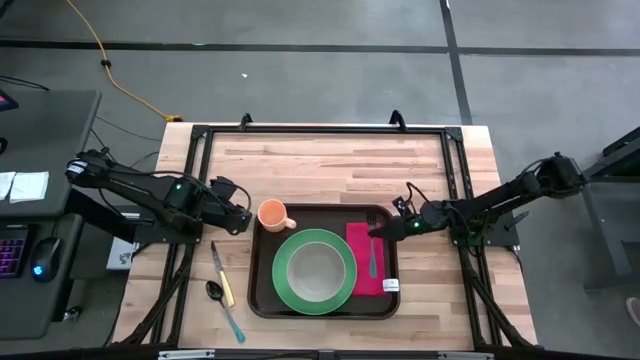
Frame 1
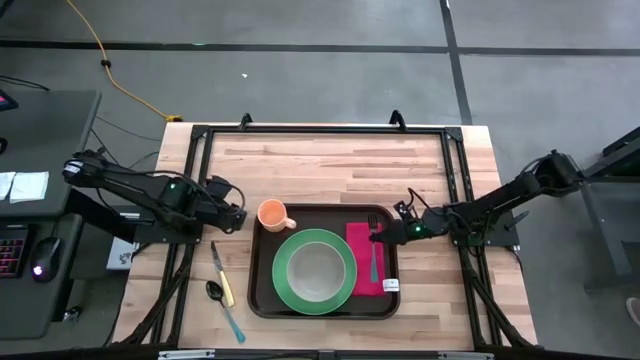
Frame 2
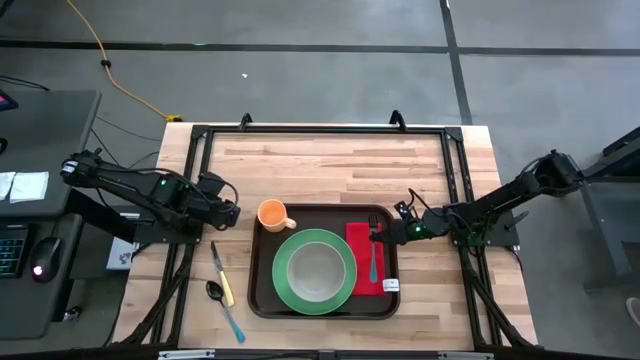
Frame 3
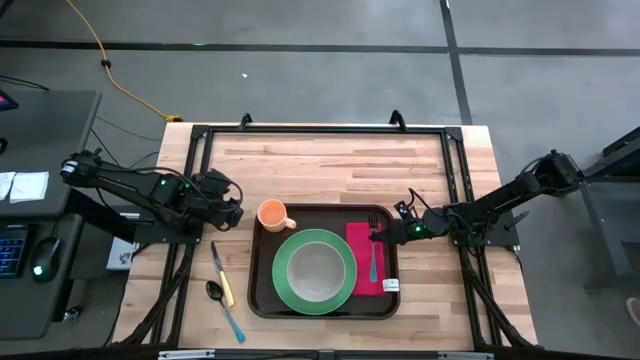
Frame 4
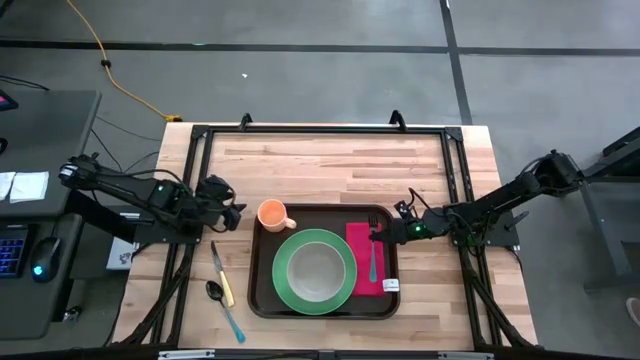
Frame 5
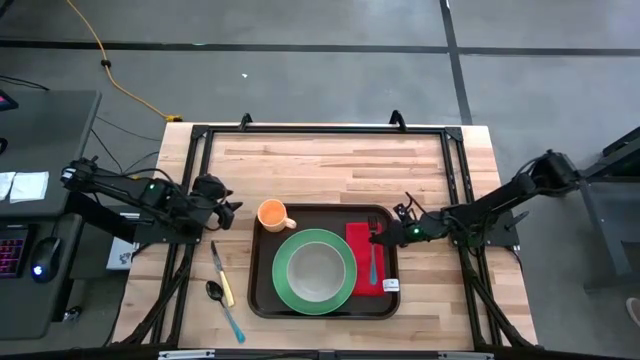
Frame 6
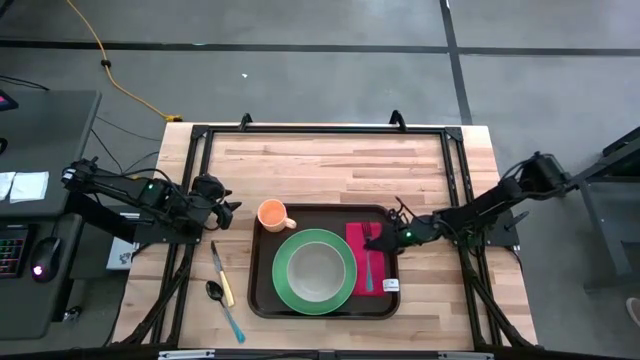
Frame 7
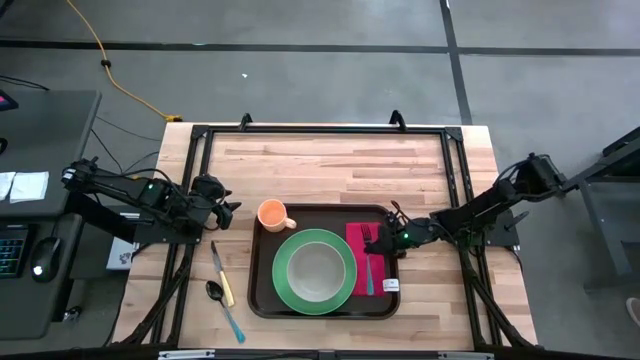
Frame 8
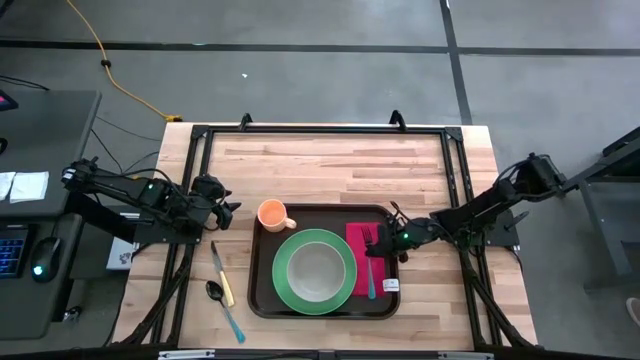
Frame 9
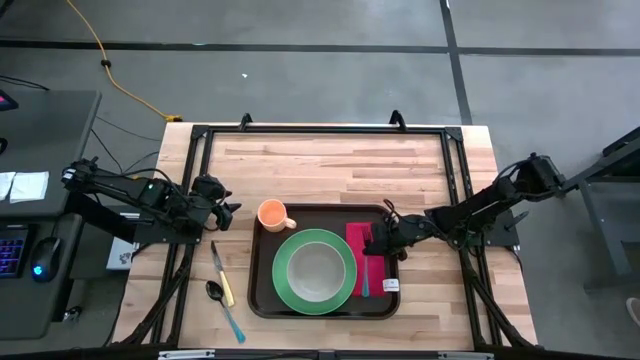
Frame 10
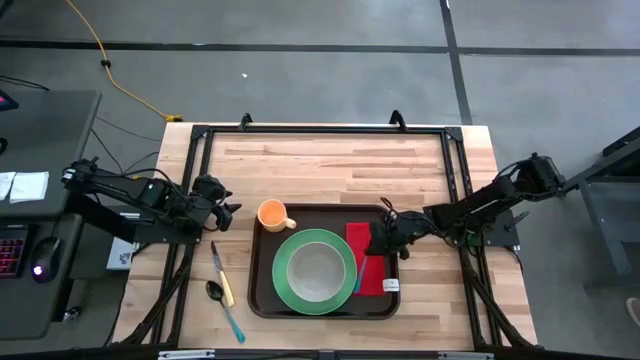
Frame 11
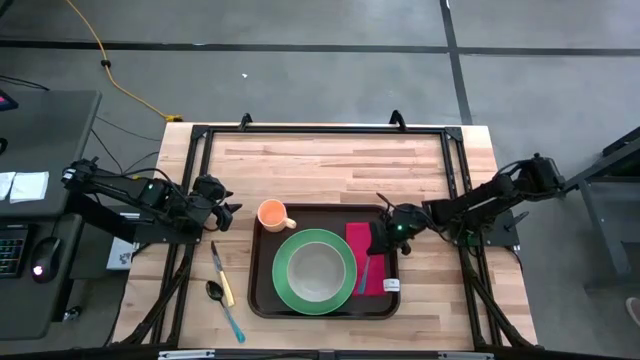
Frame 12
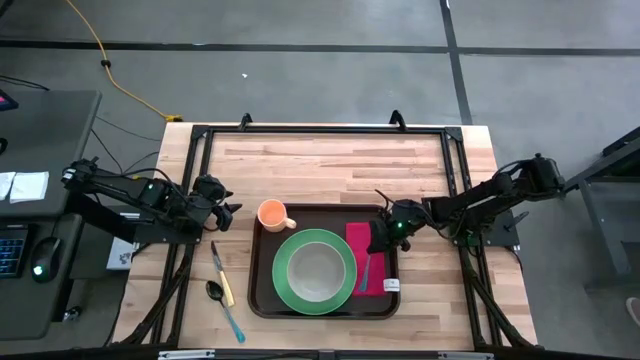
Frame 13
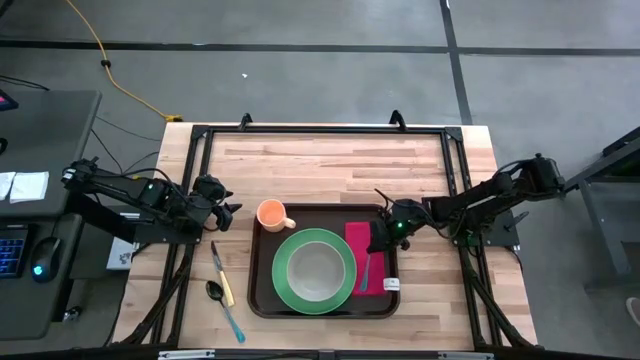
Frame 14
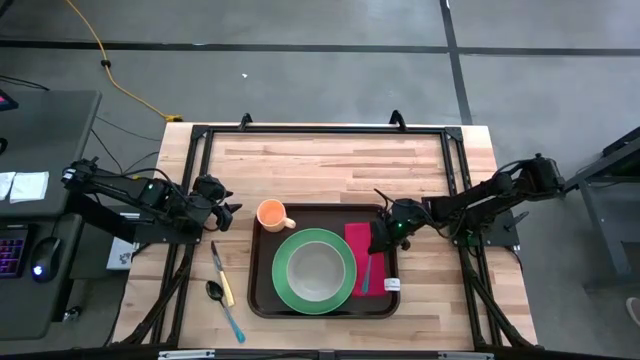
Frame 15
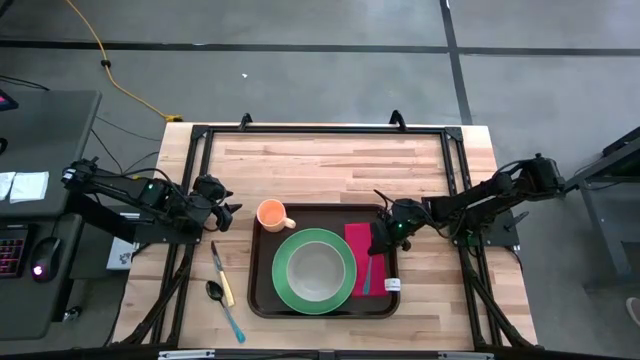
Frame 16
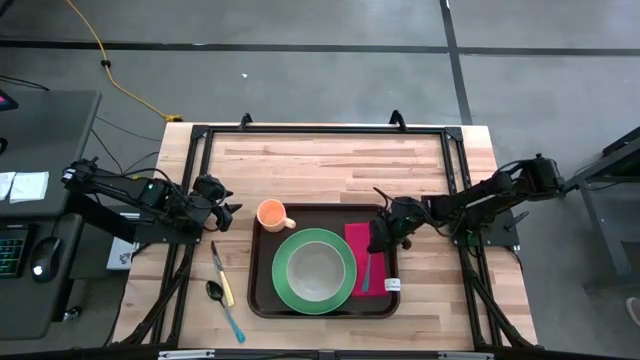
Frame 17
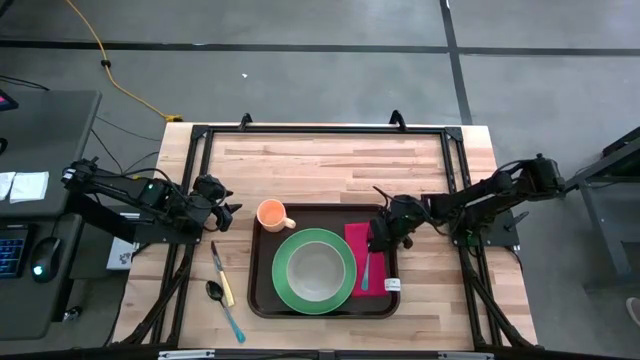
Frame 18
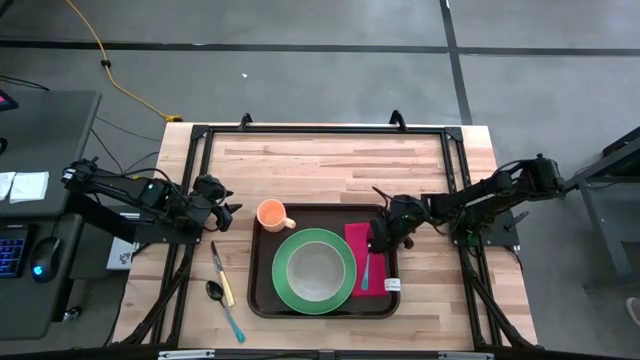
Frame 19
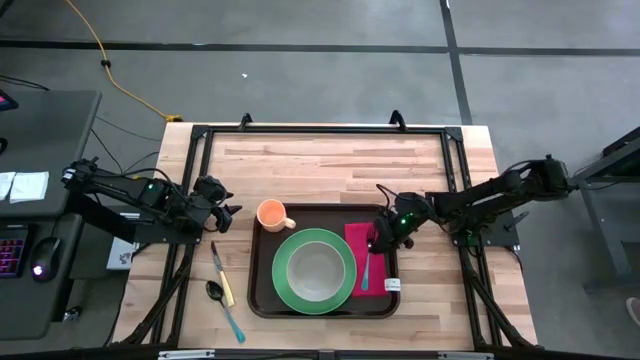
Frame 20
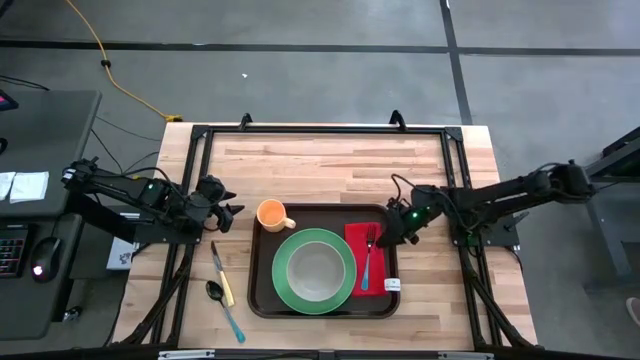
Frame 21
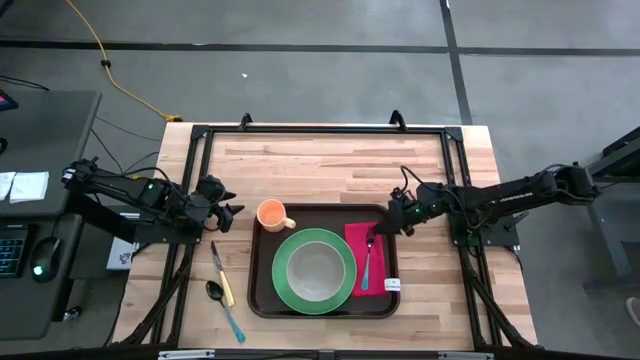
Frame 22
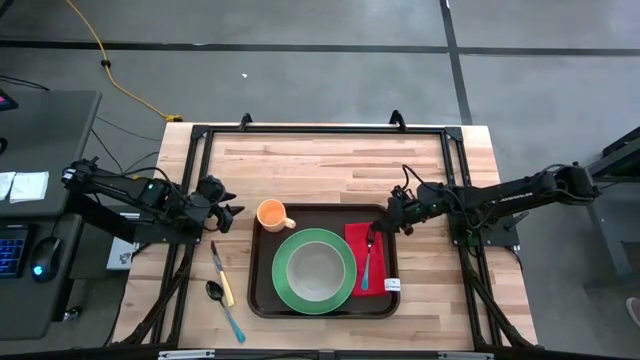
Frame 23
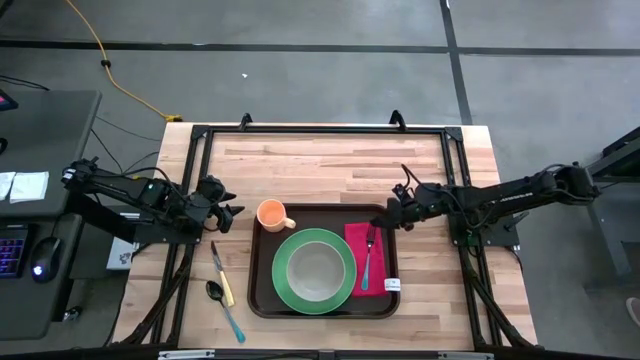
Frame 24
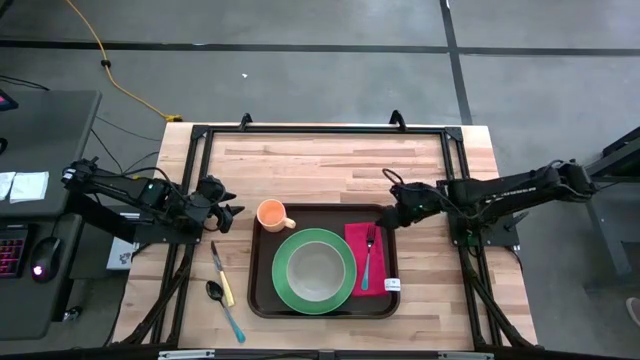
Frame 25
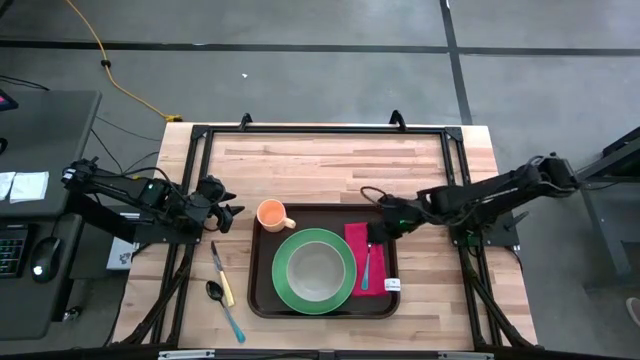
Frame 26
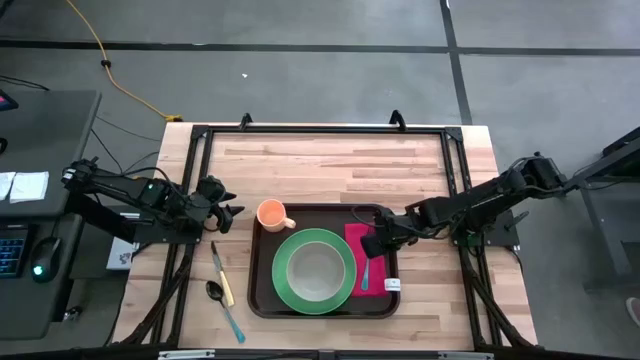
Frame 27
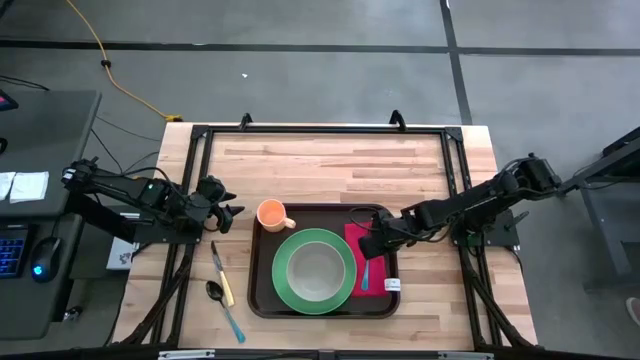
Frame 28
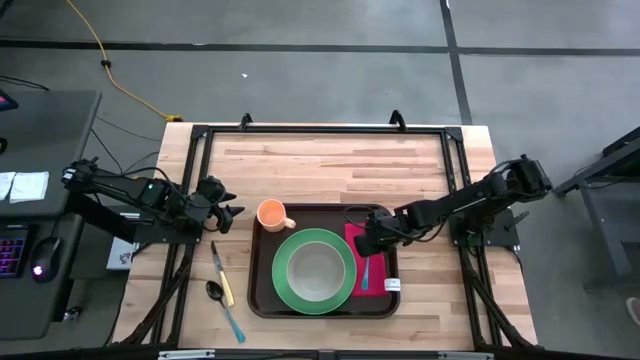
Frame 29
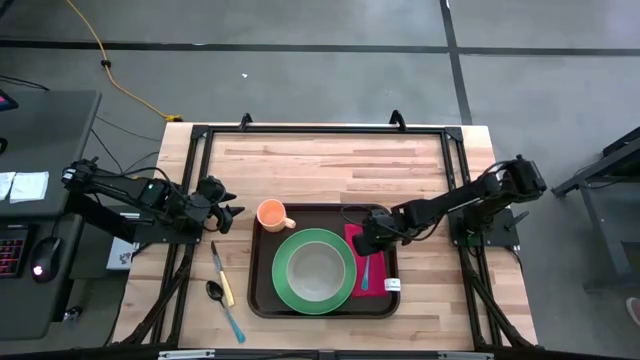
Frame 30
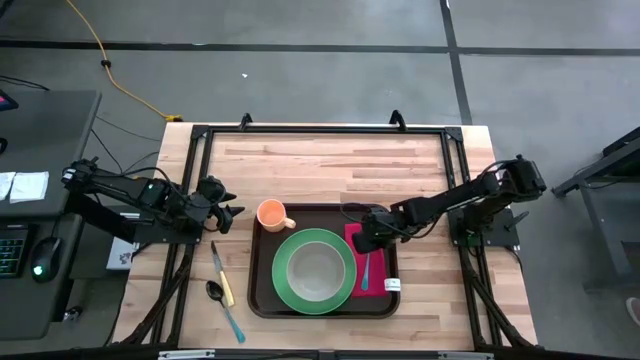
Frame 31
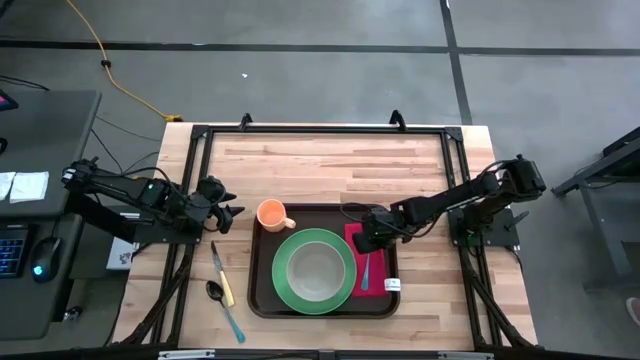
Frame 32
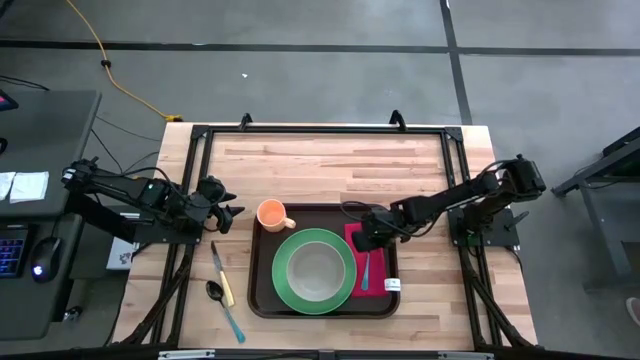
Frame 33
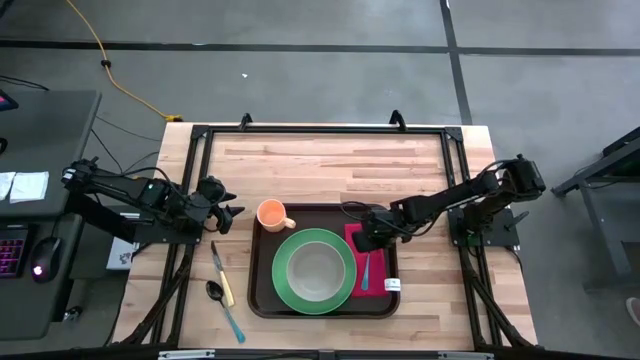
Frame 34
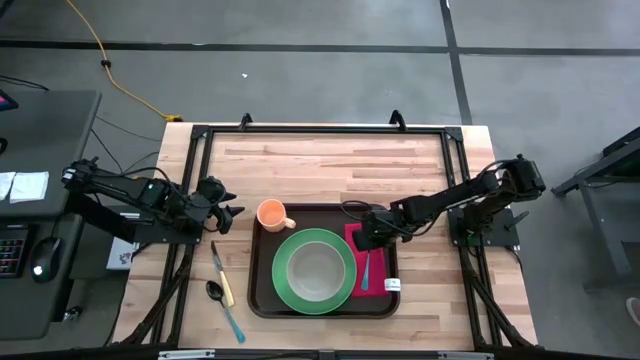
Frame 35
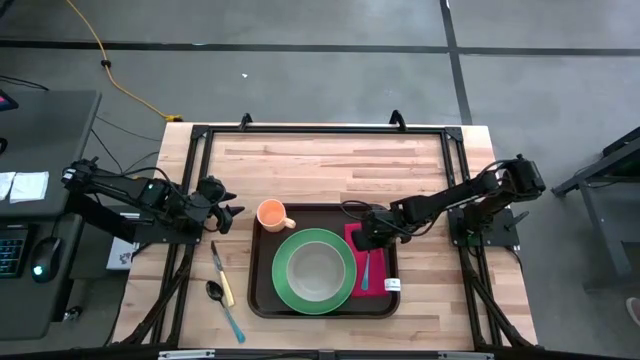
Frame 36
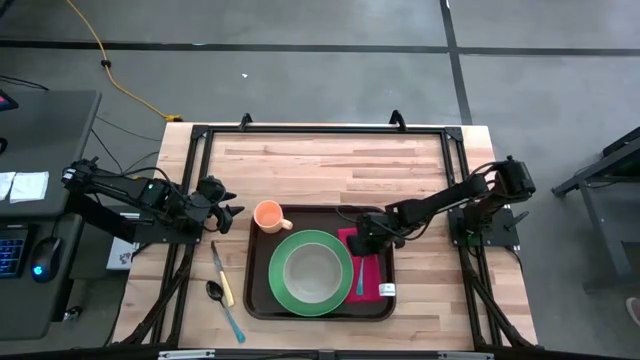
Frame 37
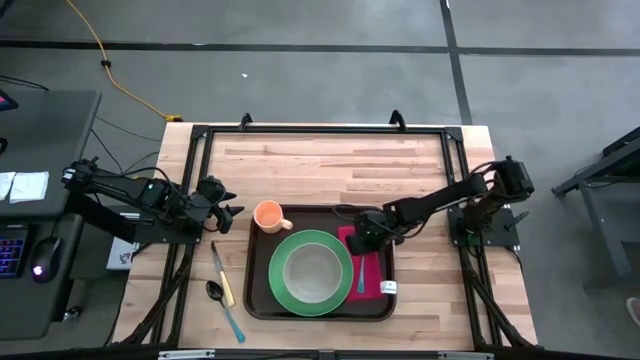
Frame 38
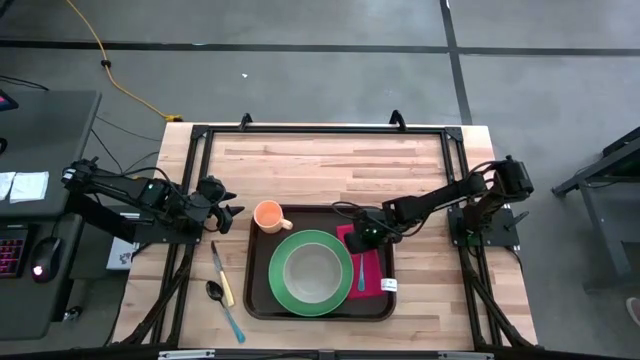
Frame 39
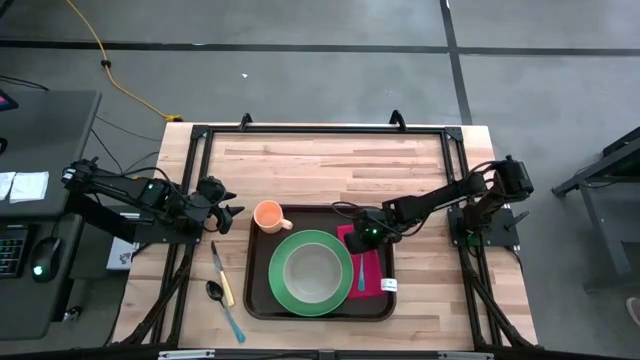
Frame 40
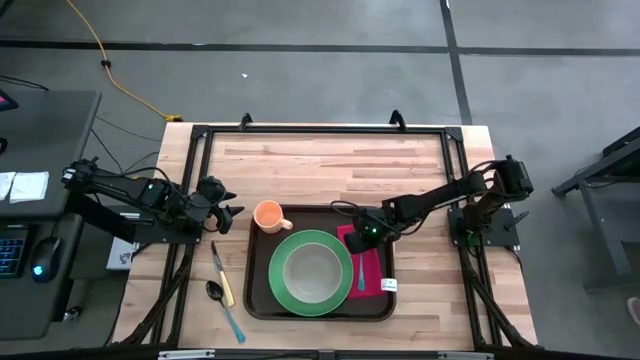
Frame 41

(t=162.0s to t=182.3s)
Task: Set up tray
Put the blue fork on the red table napkin
